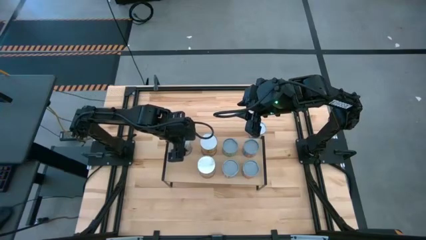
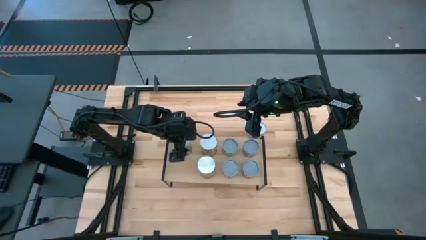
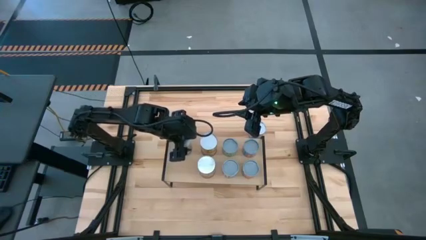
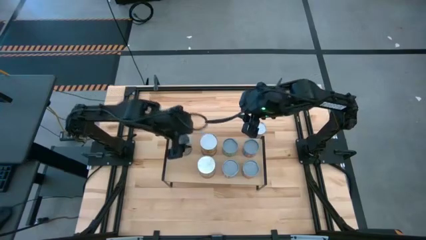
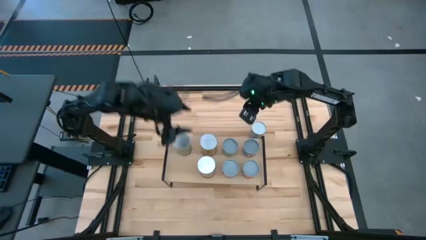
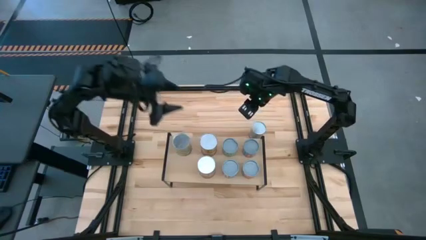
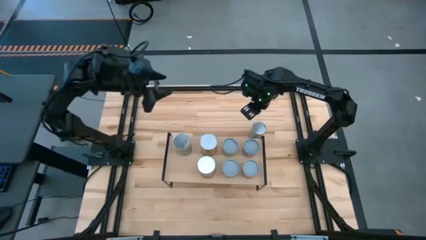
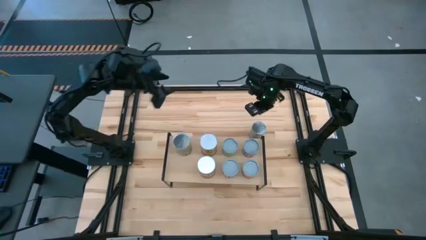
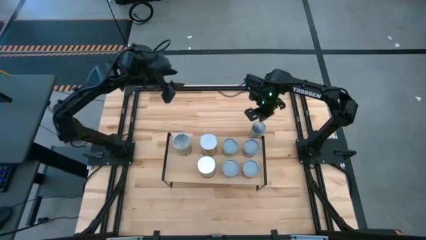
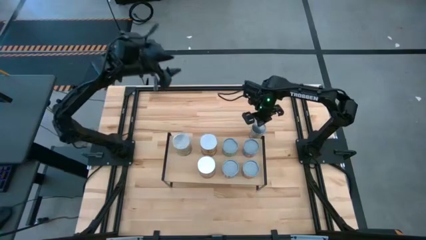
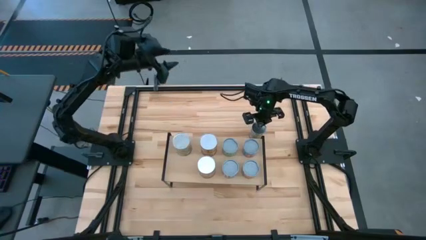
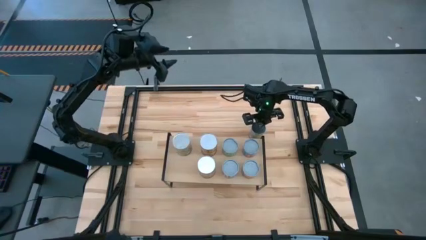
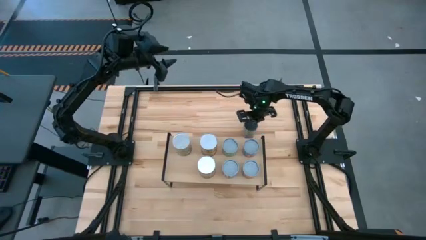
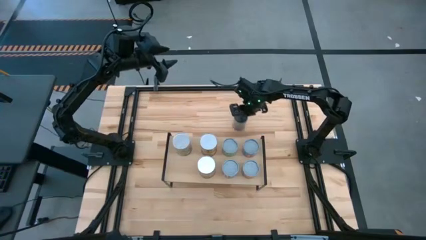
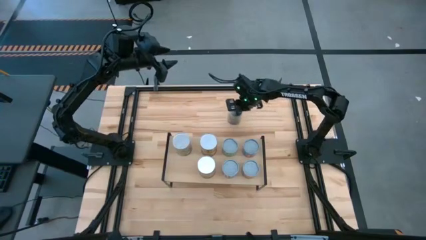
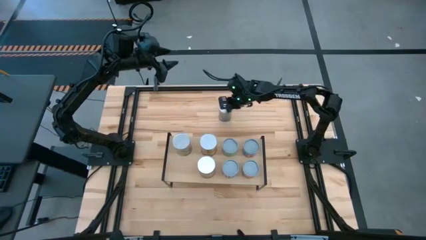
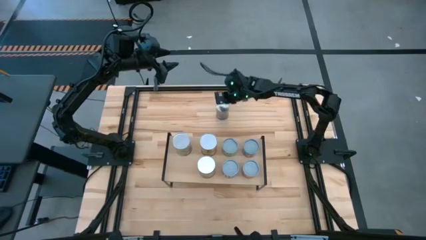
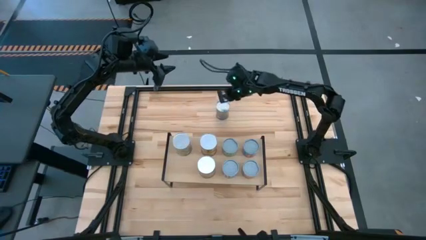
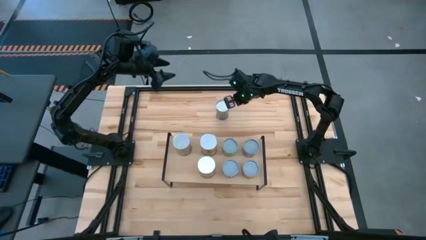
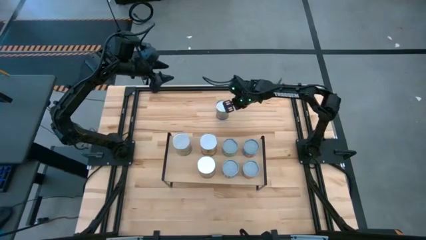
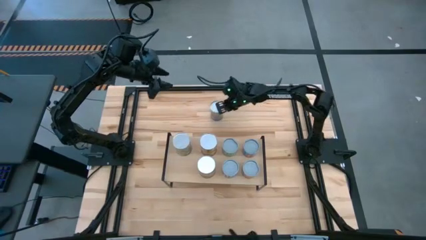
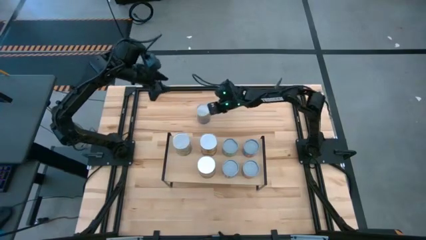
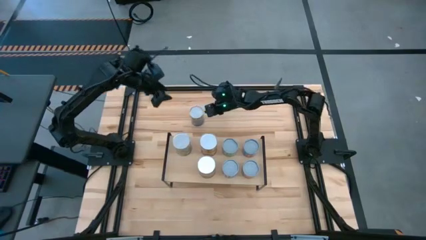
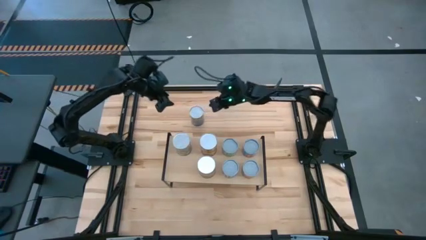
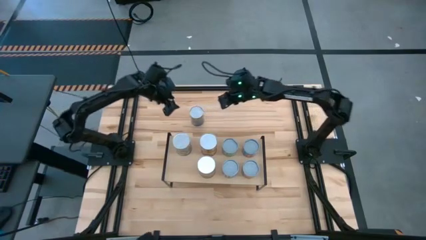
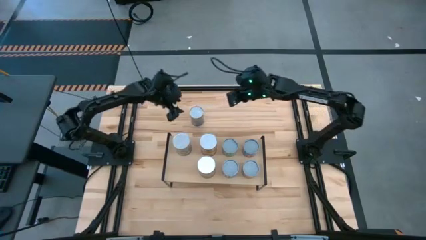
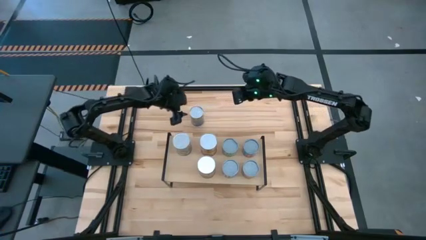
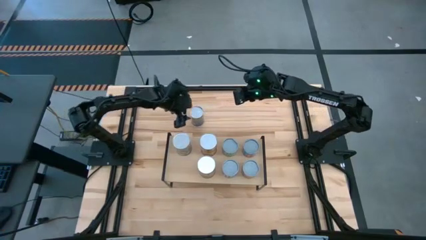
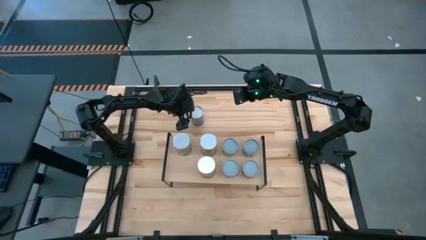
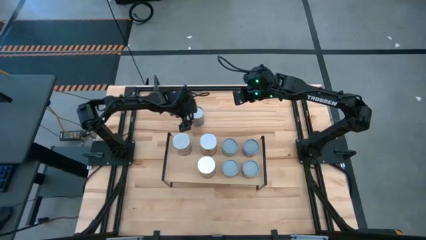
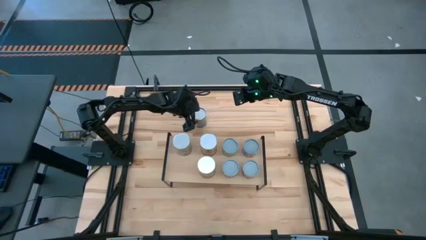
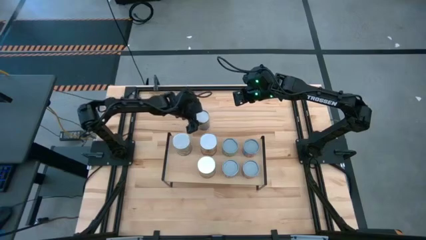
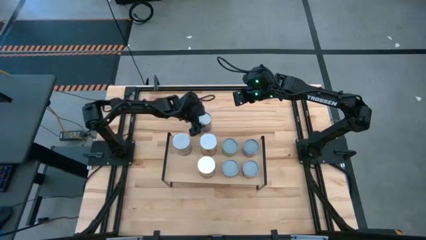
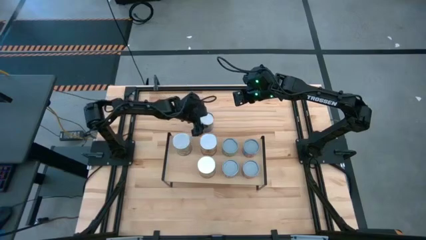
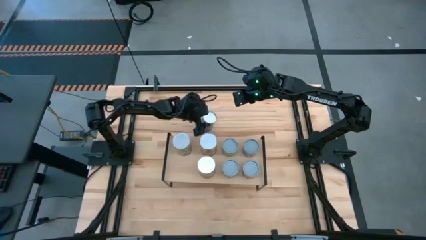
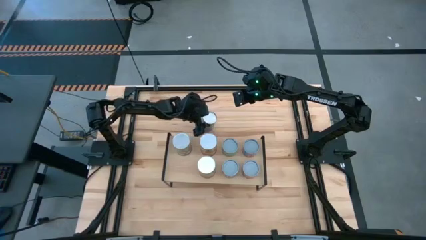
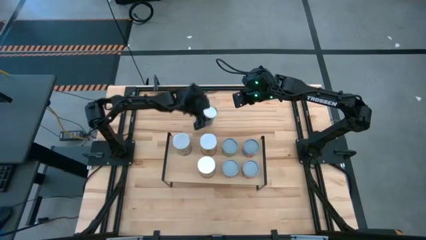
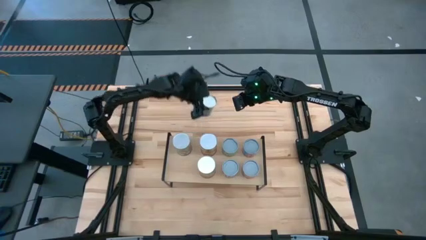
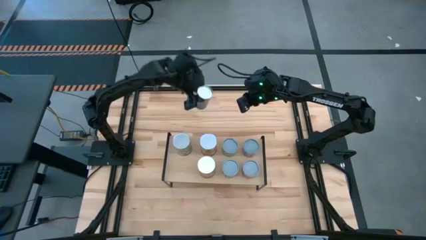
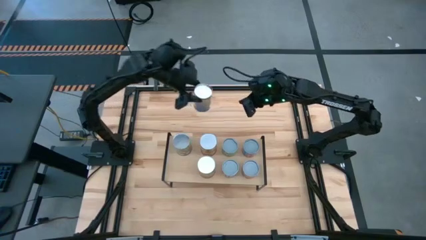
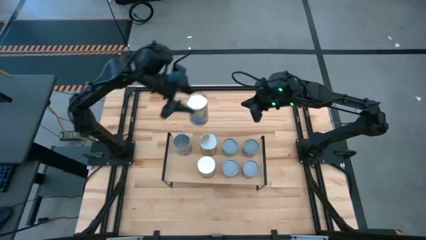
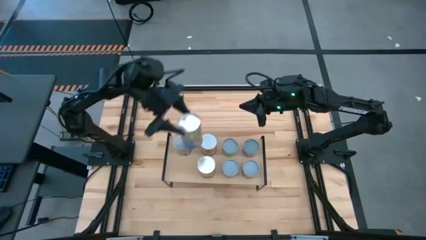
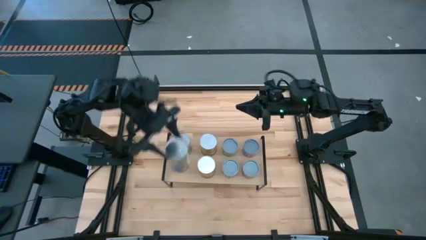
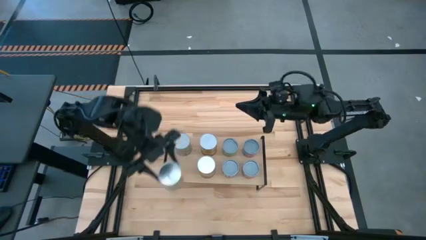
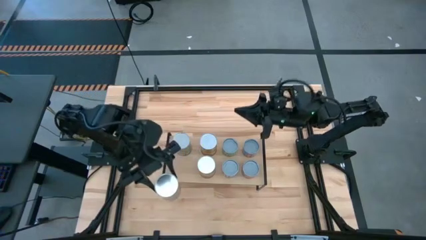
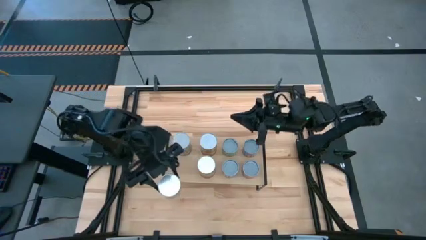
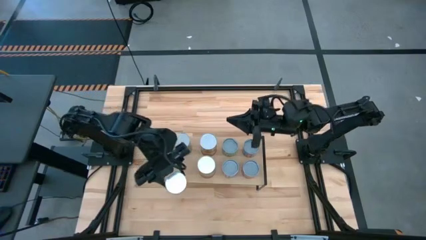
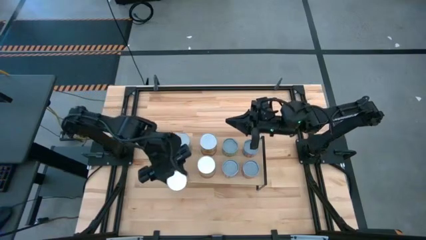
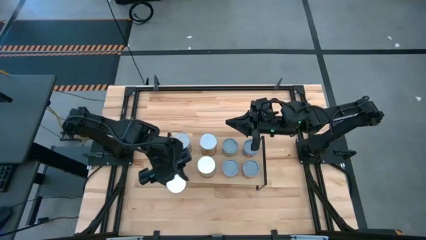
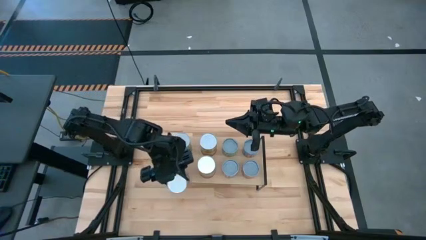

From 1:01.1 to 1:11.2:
Task: Pick and place cans onto a shelf
Put the large canned peaches on the shelf

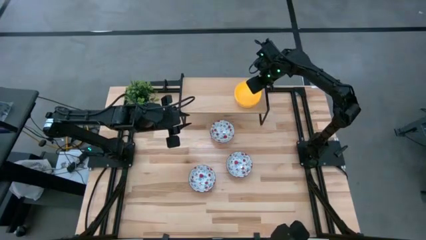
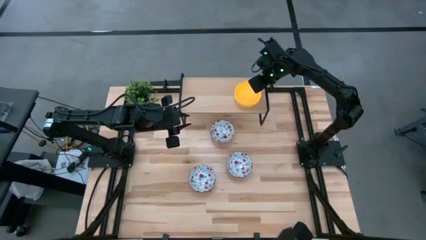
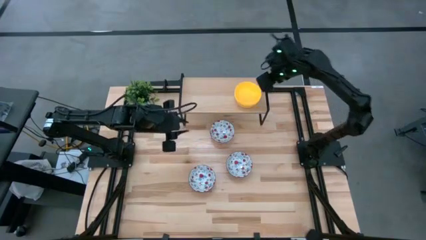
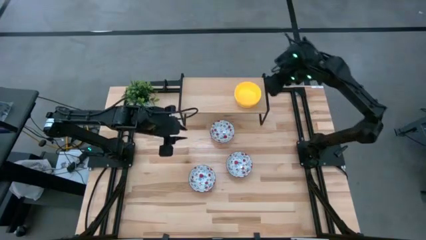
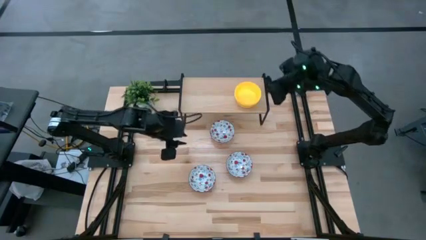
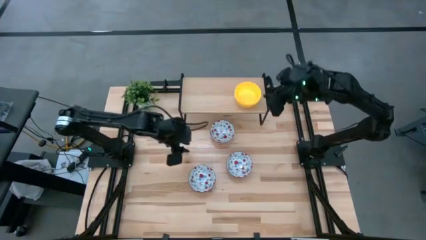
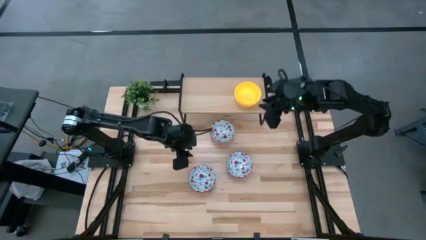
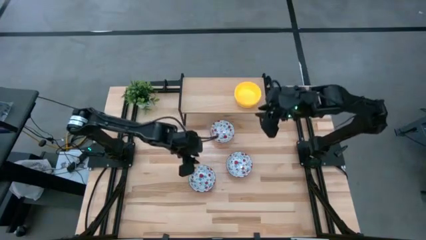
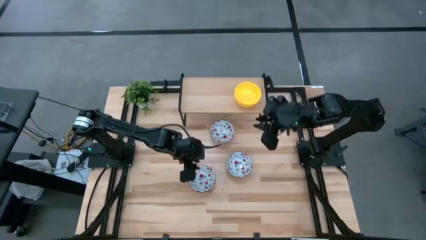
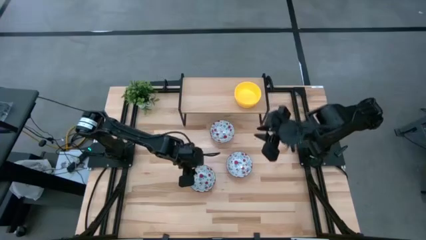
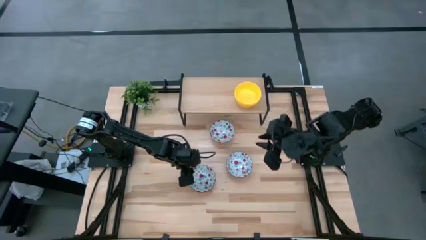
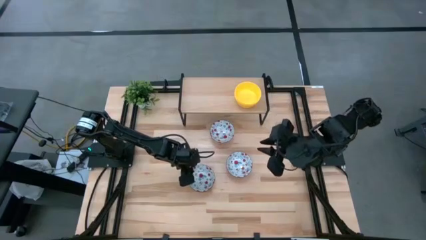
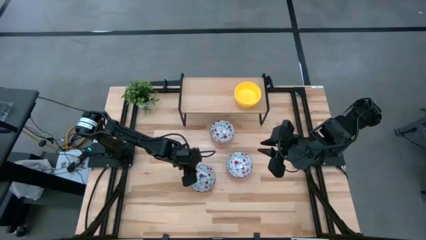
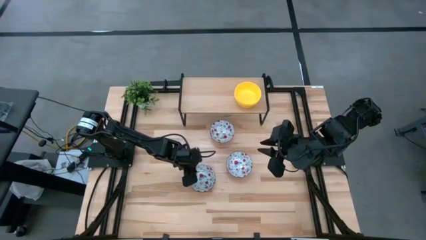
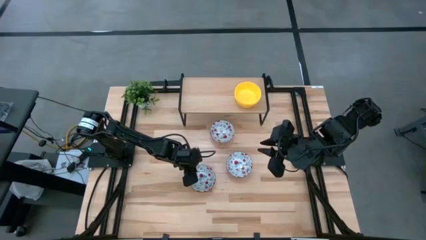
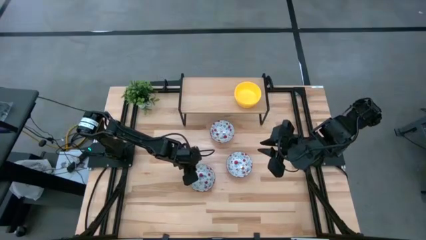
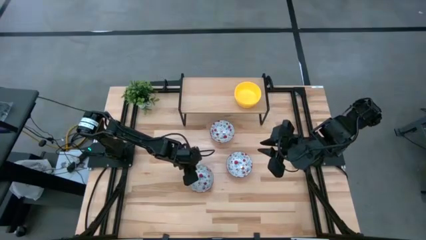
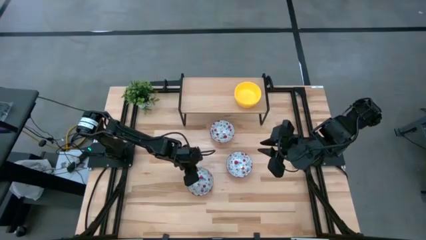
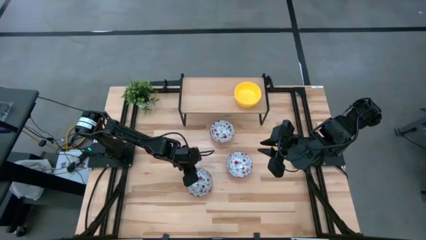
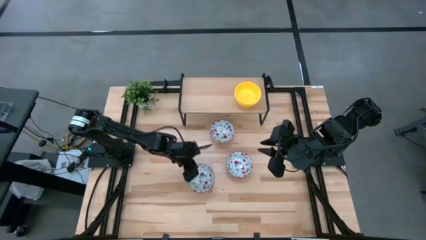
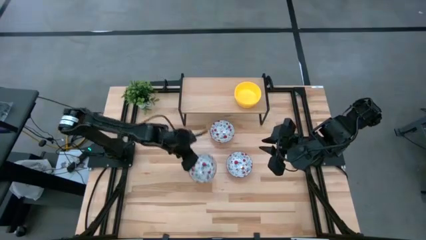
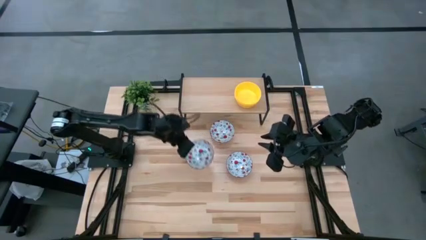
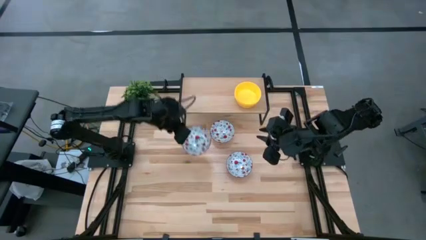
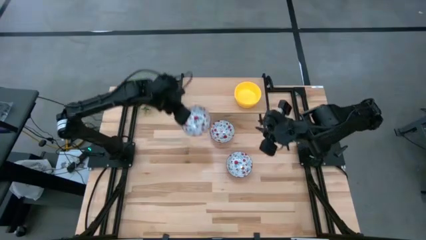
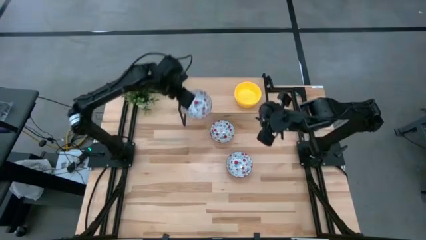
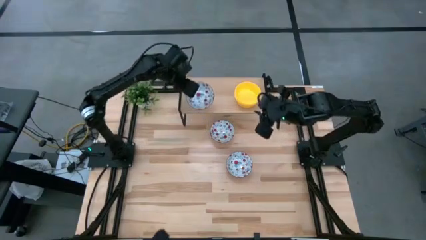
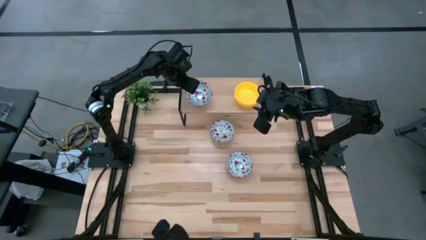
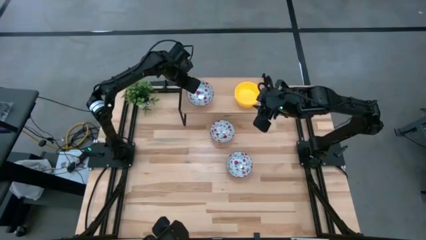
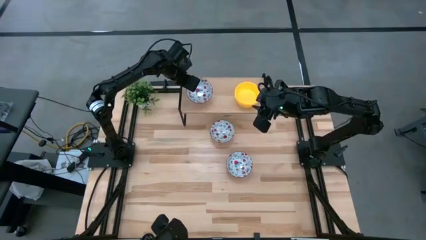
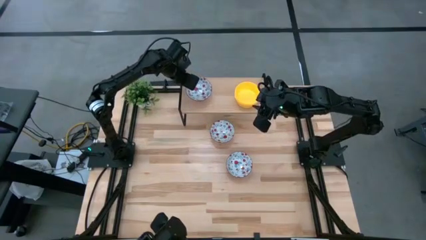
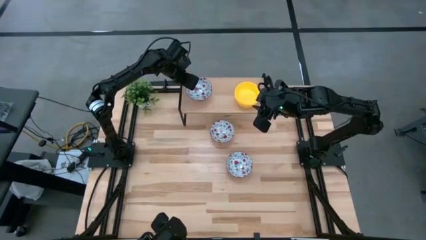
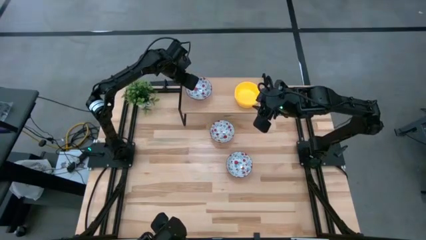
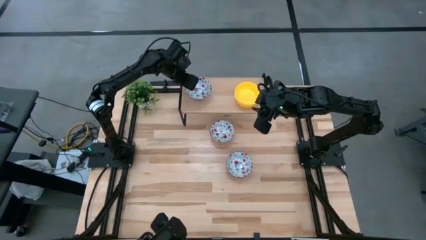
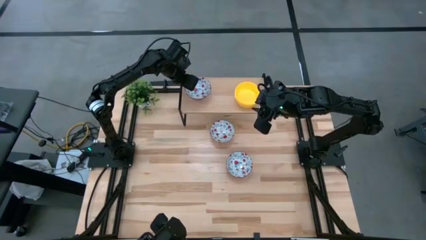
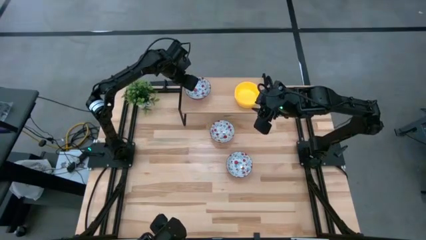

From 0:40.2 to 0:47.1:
Task: Pick & Place Mini bowls
Put the bottom left printed bowl on the shelf
